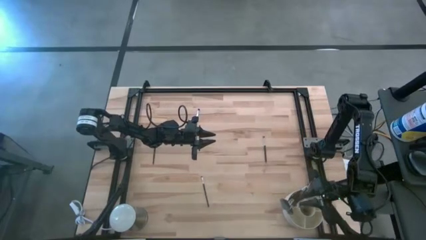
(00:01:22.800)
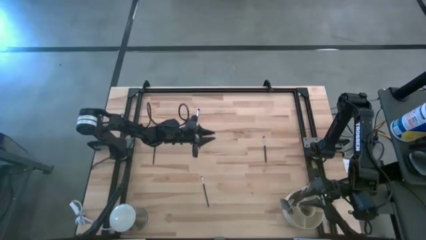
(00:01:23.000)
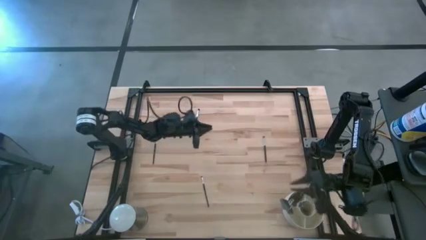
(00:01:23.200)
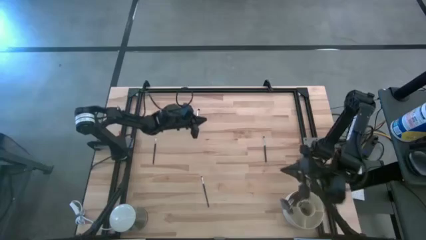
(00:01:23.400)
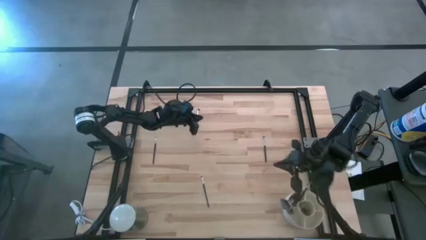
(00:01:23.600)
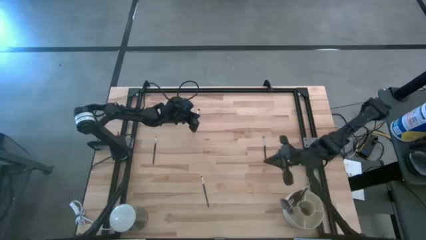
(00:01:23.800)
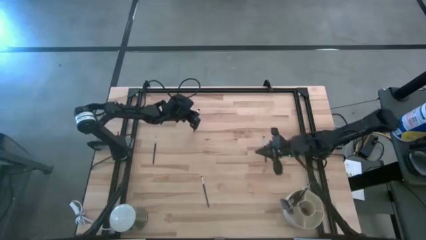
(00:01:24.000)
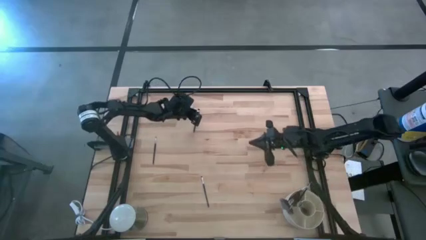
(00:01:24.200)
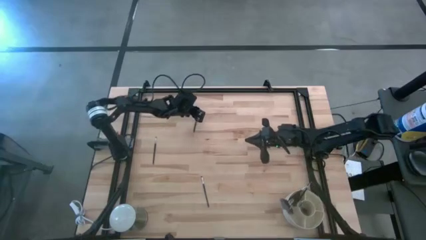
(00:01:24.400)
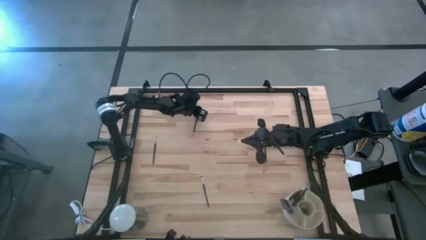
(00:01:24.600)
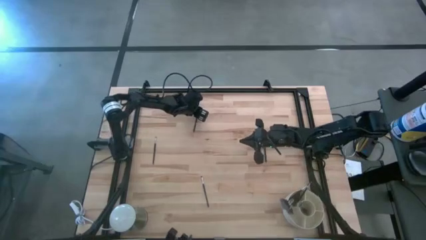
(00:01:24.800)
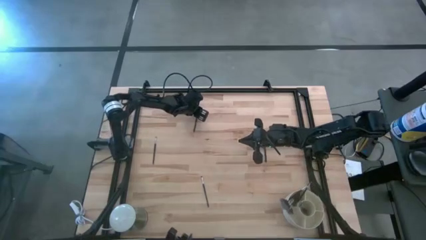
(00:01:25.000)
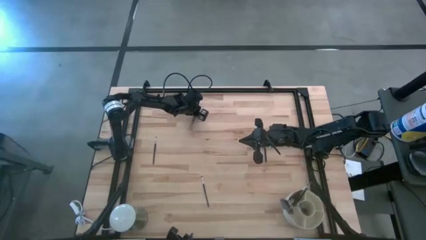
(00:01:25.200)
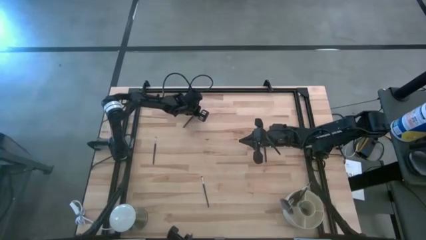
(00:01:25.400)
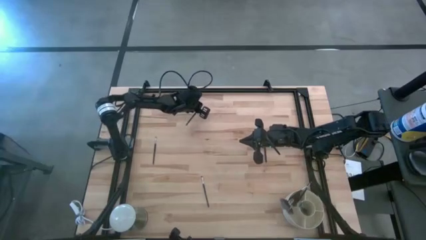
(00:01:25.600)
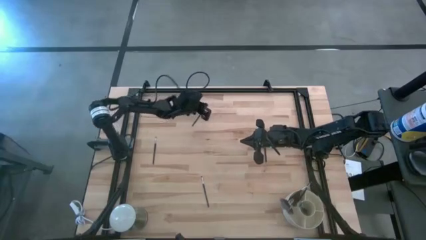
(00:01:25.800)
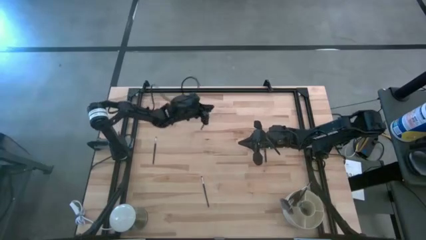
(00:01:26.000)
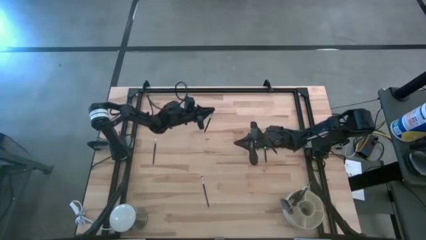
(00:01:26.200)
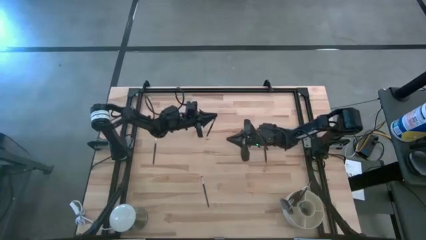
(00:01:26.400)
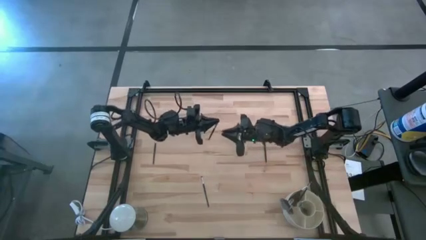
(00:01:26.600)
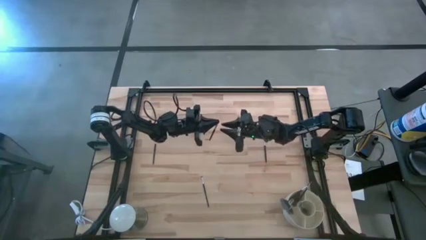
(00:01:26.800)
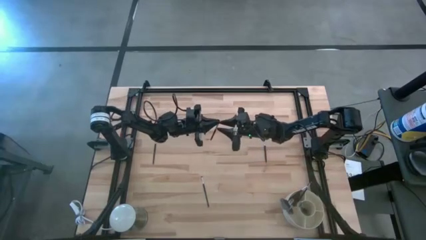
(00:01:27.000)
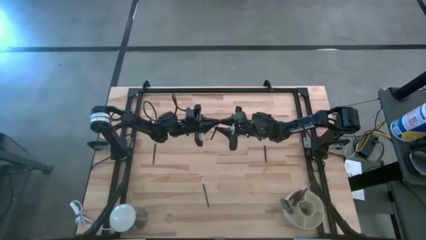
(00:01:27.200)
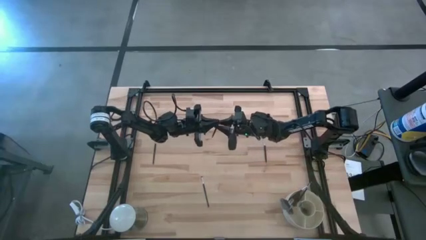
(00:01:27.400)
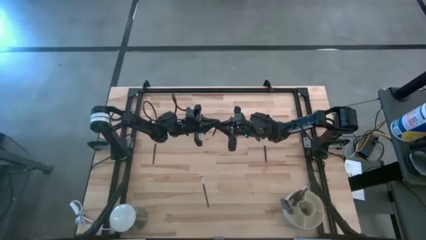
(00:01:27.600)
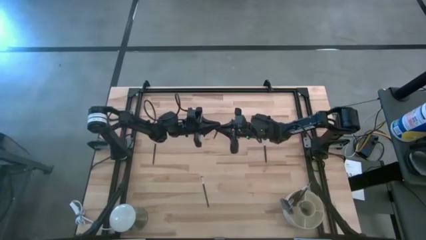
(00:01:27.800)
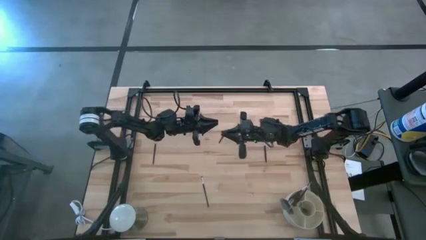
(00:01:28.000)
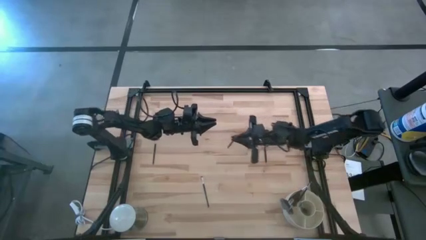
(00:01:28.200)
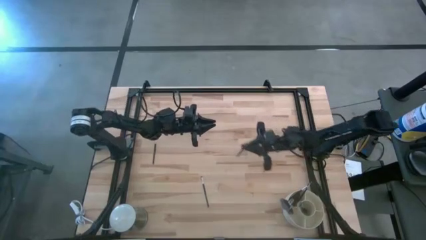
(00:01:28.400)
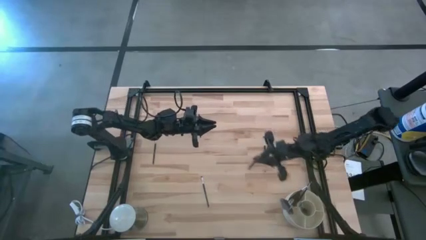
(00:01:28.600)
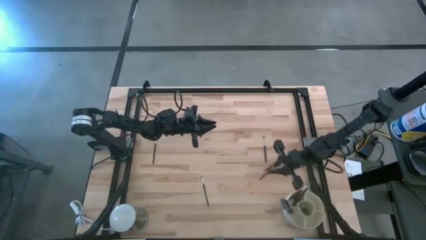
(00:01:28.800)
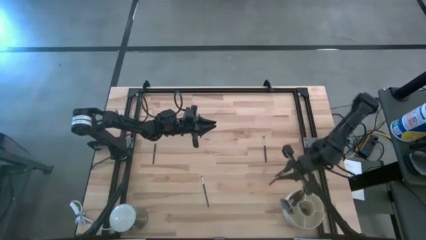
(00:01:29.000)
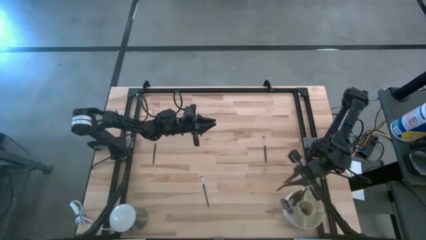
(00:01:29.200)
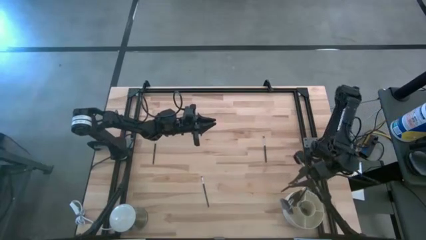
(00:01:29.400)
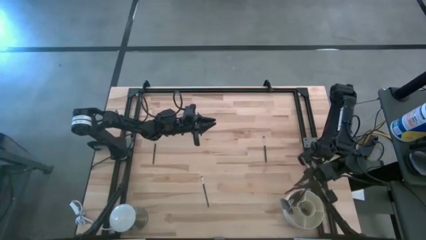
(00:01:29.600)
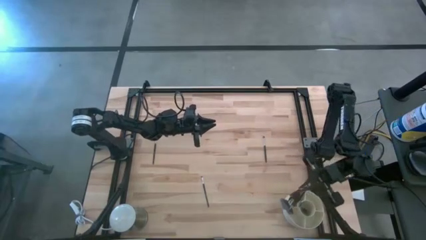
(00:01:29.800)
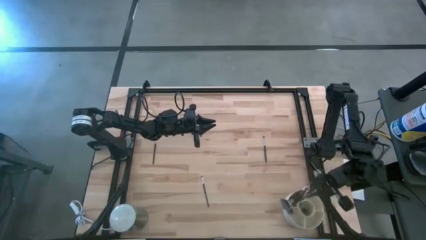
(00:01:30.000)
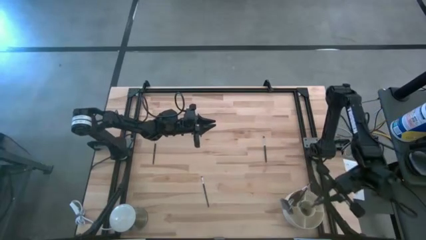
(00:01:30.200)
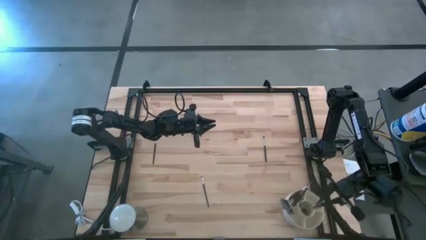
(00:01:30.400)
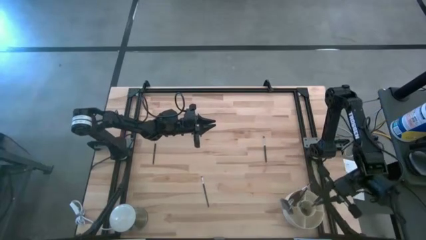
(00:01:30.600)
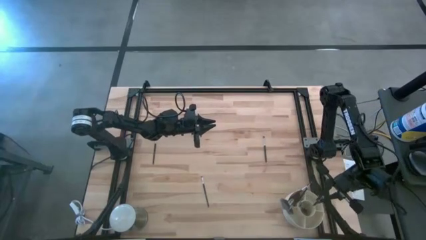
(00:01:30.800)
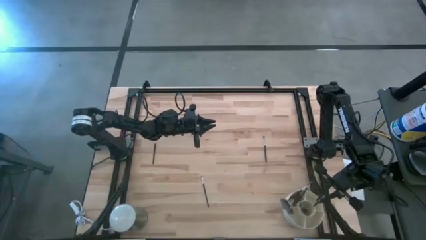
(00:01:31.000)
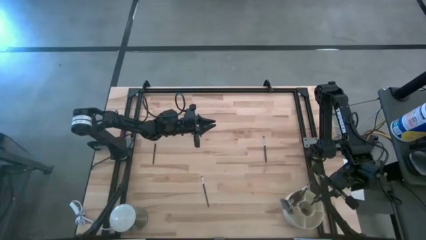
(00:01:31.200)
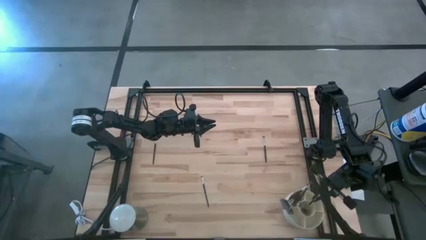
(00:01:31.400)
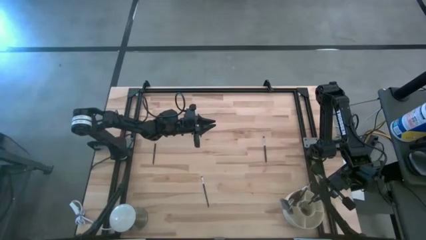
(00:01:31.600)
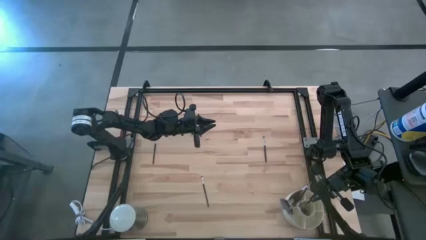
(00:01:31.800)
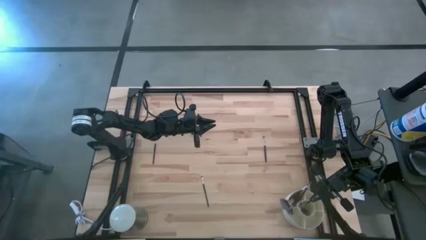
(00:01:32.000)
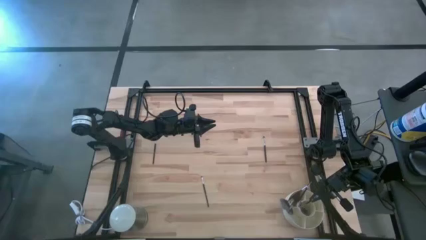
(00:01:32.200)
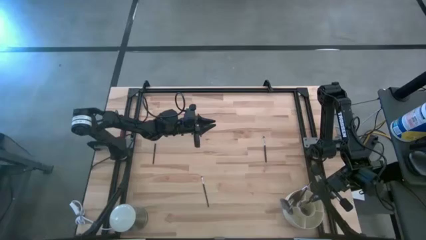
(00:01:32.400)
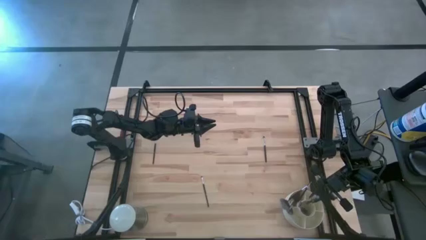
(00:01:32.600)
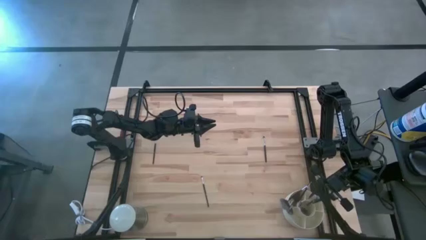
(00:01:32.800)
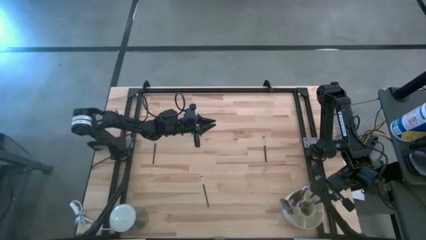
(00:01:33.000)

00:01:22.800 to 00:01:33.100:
Task: Put items in baskets/containers
Put the black blush brush into the white organizer
